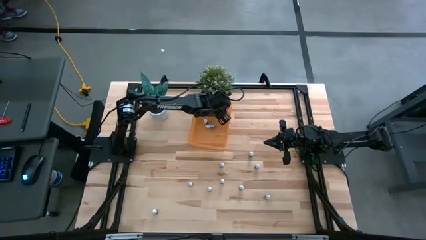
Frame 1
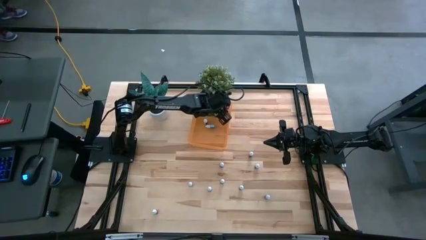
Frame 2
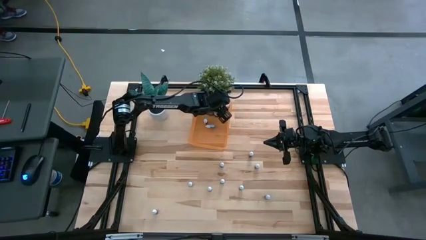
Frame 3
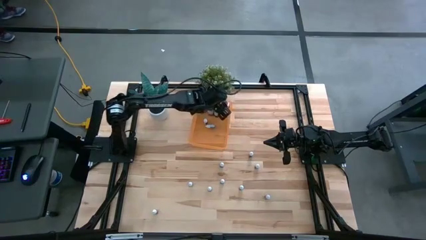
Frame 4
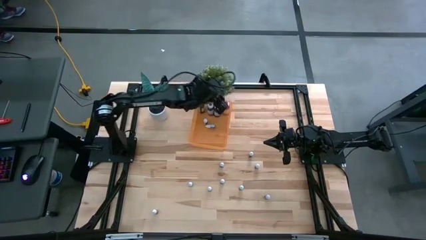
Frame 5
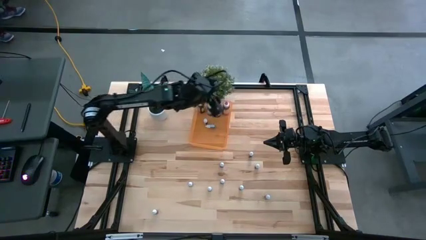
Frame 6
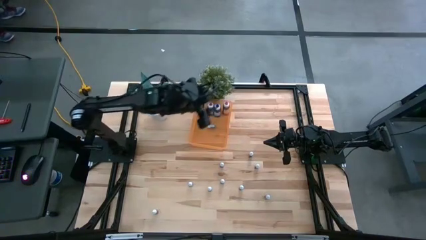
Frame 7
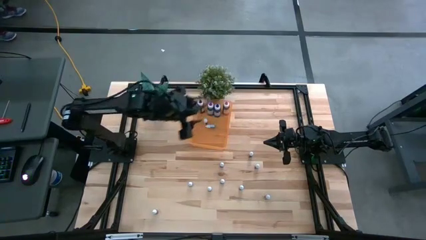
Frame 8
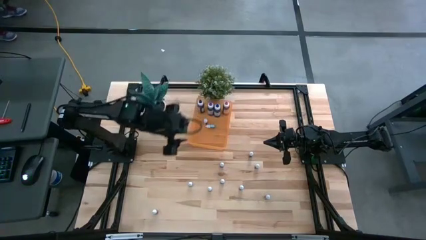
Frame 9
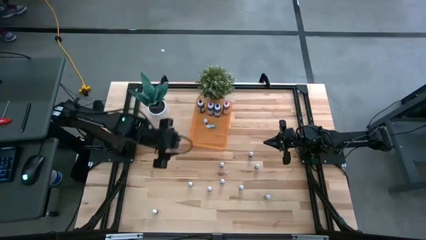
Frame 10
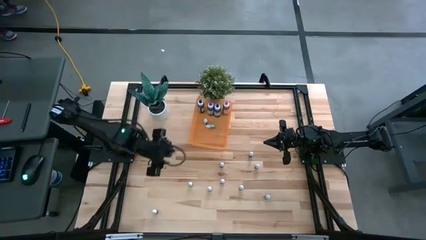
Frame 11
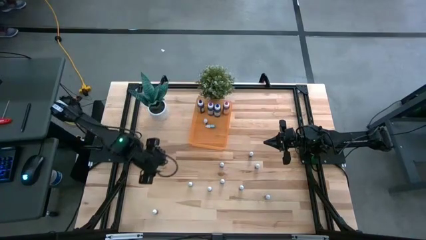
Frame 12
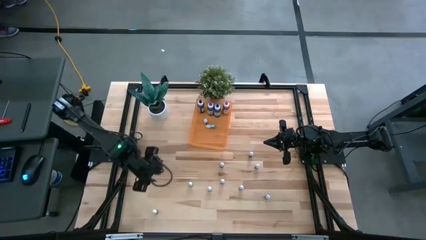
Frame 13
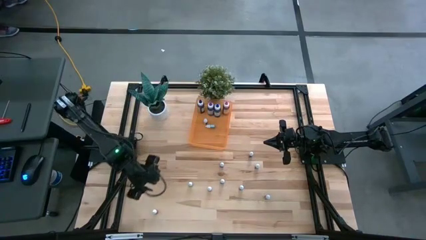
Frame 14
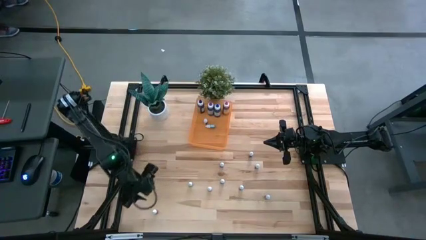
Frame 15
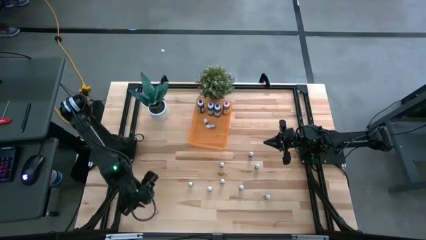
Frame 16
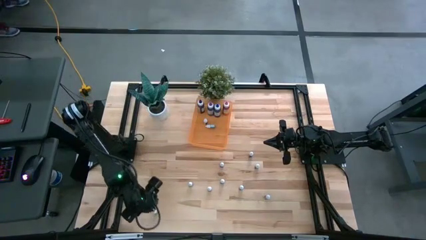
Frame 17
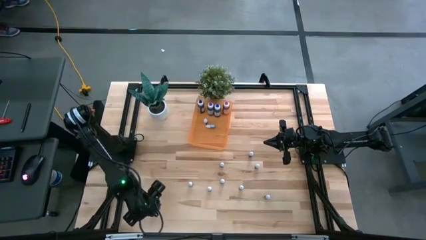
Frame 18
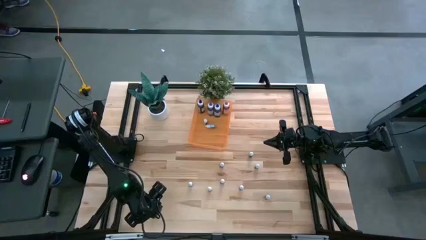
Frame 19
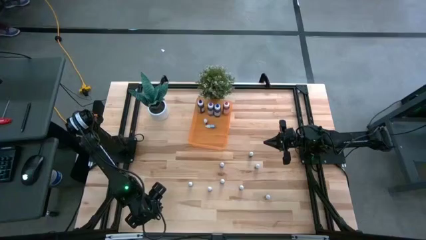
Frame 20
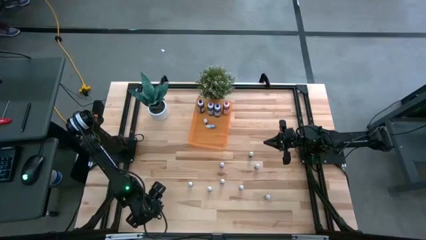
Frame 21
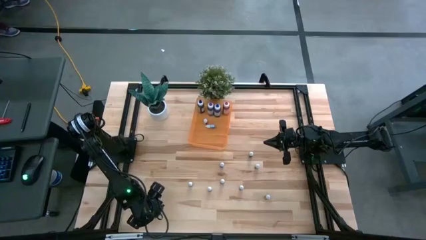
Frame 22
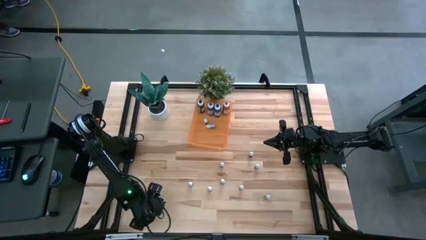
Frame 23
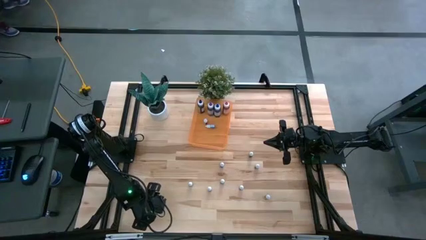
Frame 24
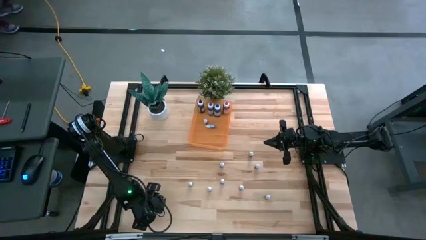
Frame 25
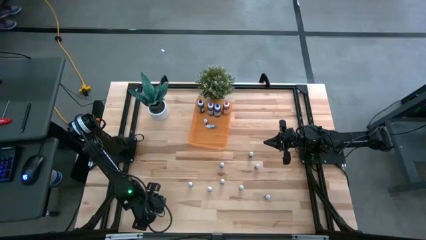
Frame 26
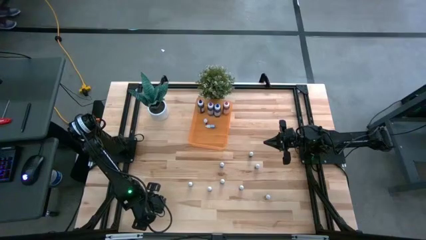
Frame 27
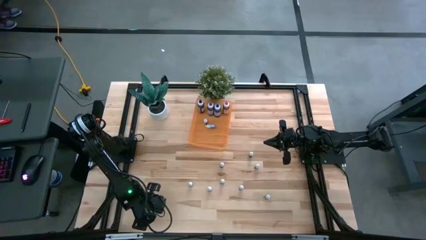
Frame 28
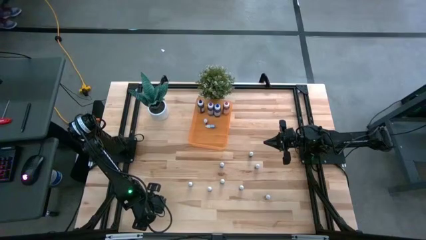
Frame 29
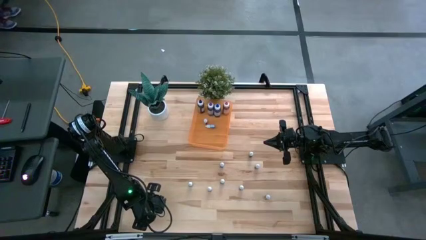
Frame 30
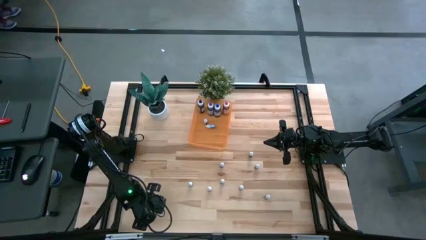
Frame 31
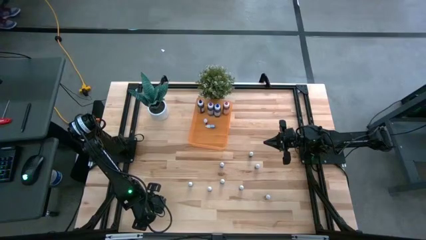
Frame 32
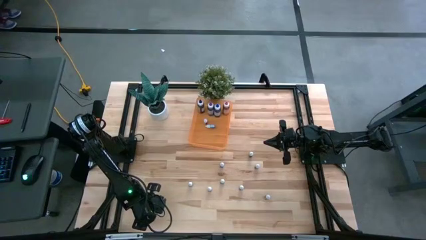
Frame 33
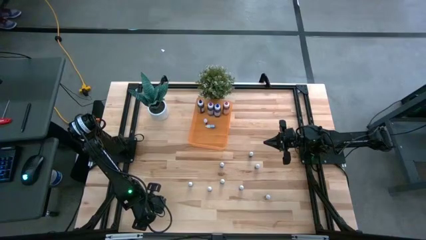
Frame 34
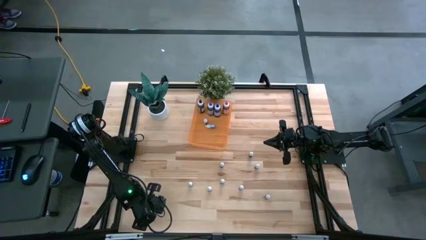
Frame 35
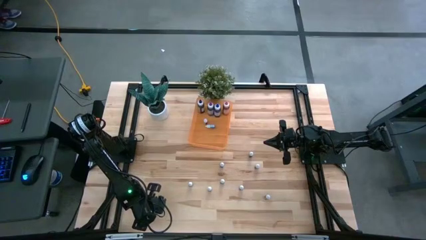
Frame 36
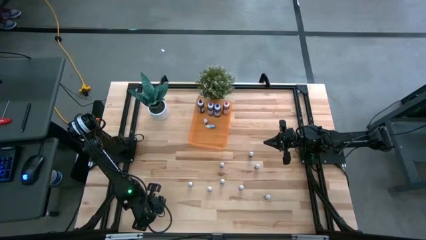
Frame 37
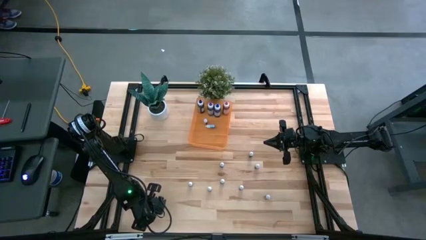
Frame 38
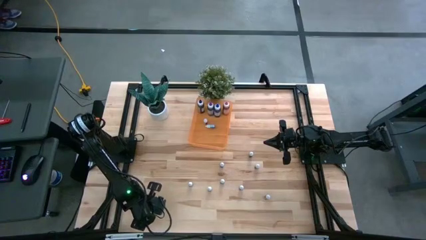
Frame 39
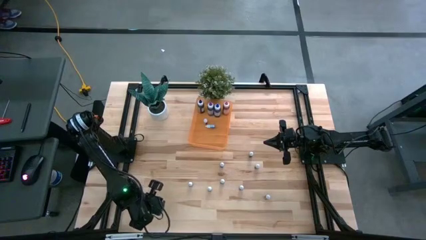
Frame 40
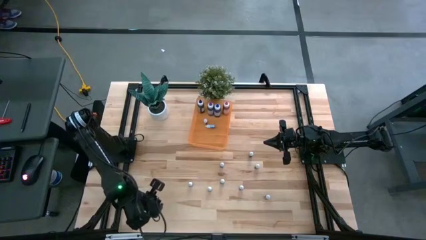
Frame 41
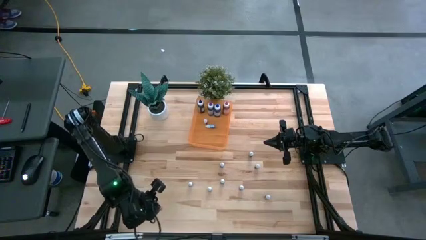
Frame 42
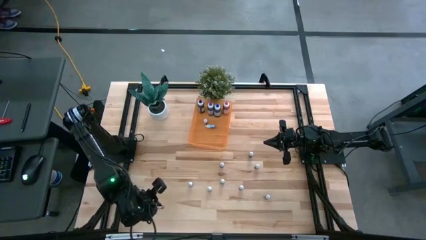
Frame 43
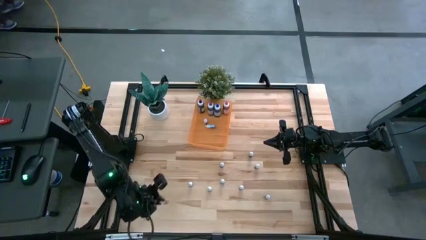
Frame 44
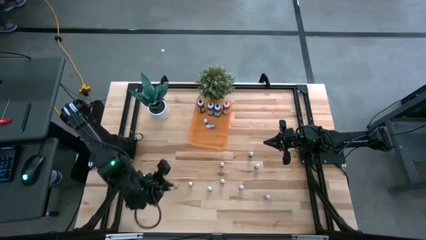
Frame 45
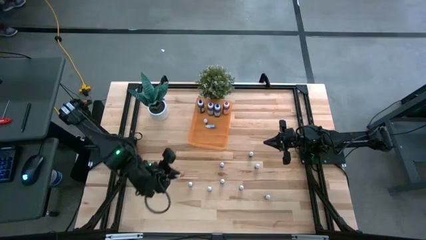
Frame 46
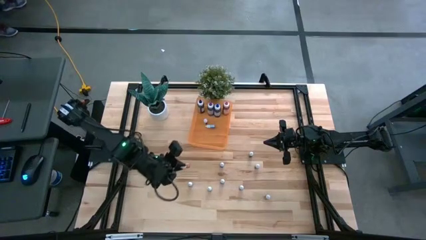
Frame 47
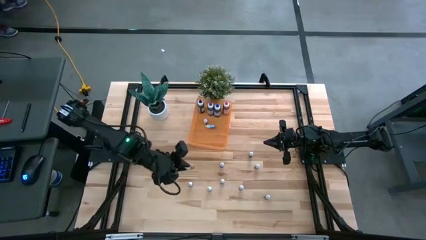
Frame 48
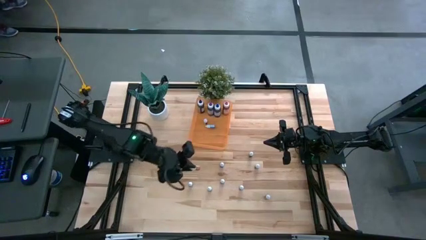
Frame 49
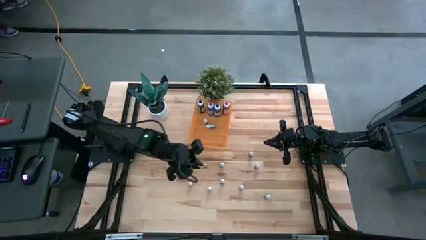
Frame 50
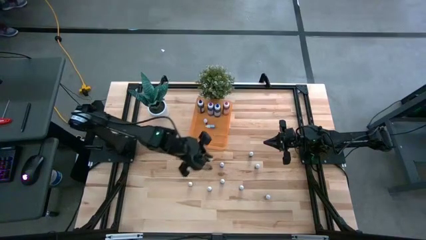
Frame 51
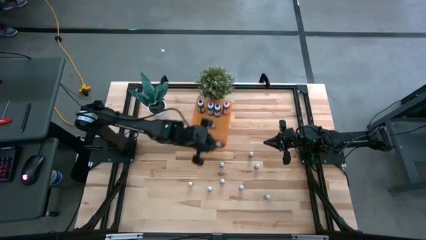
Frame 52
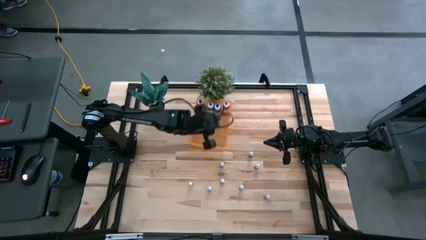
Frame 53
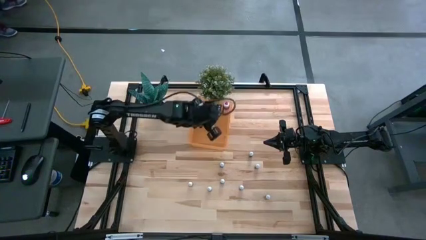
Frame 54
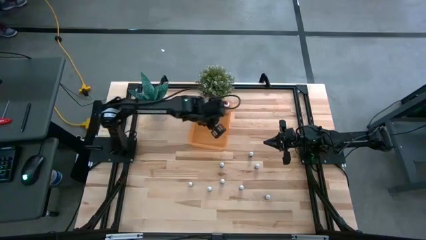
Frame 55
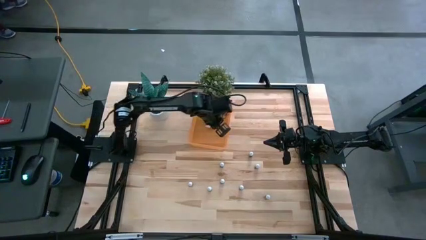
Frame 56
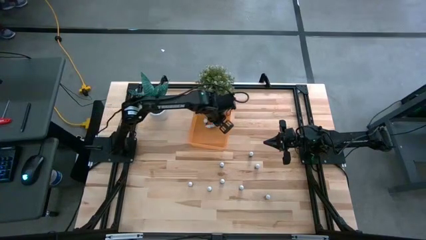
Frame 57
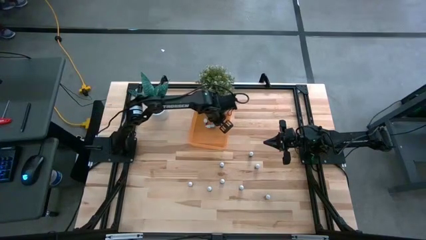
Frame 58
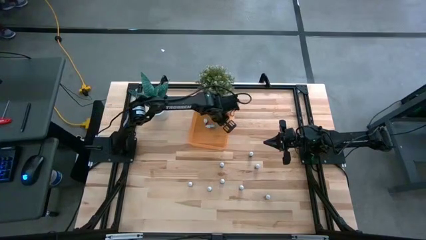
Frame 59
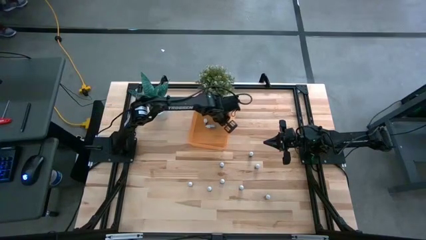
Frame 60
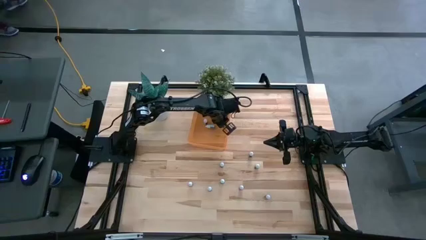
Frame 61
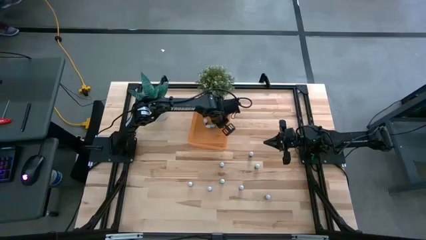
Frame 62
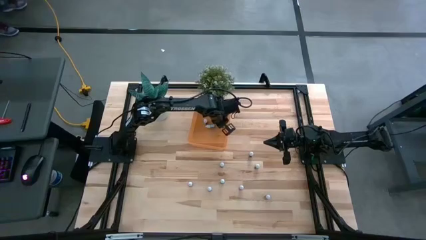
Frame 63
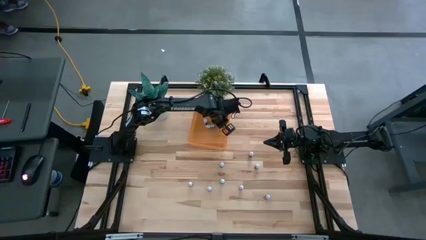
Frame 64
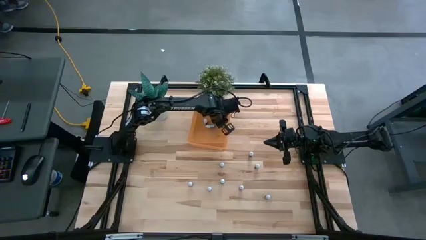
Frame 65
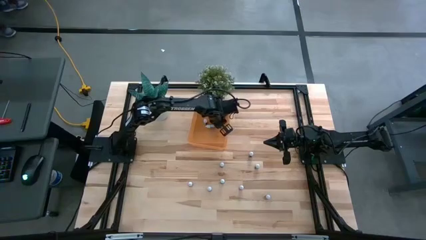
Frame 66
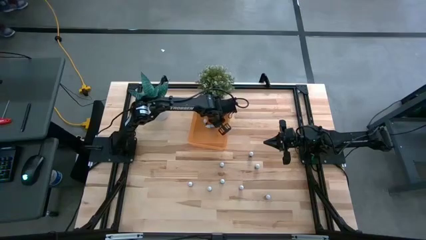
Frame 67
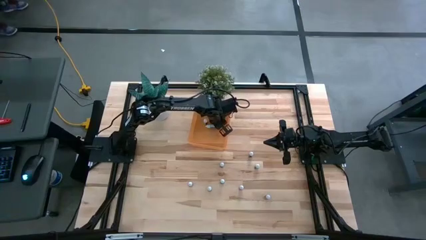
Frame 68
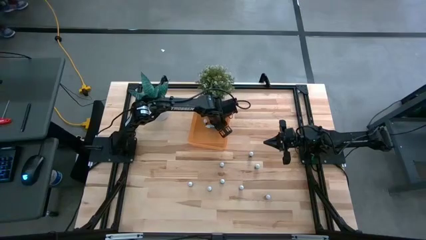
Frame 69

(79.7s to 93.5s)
Task: Pick & Place food coloring
Put the small orange food coloring bottle into the orange bin
